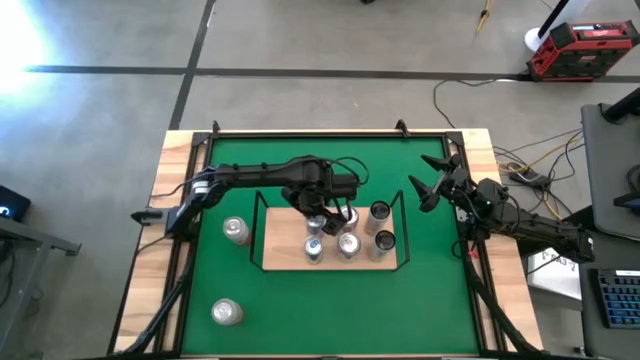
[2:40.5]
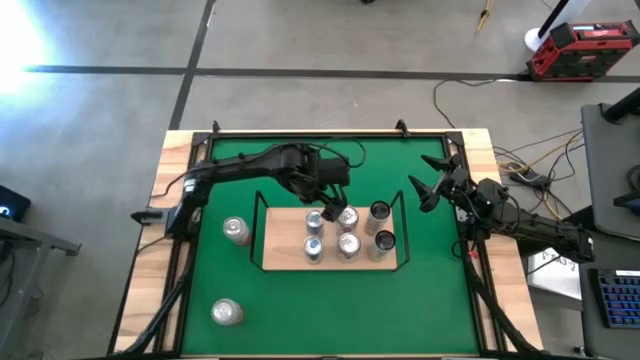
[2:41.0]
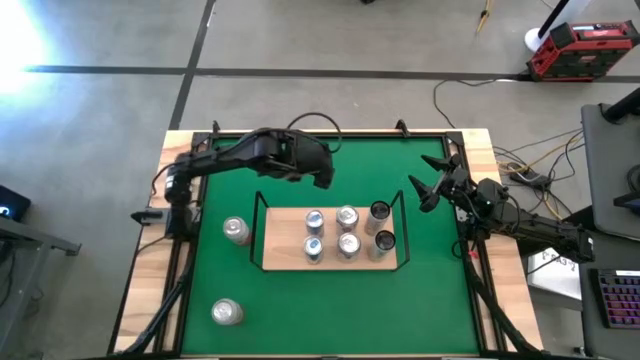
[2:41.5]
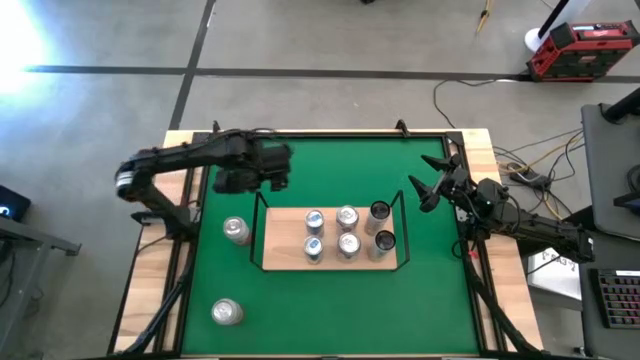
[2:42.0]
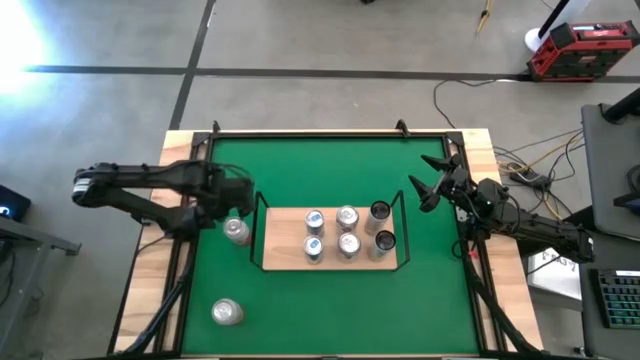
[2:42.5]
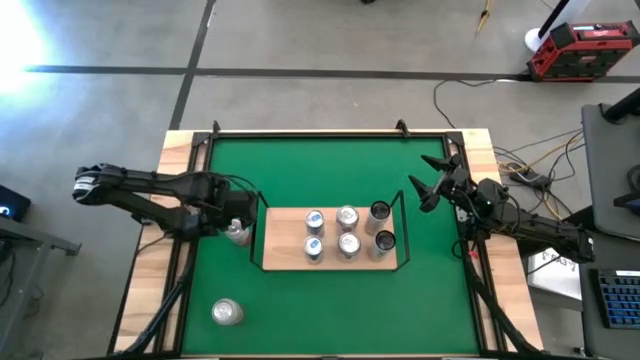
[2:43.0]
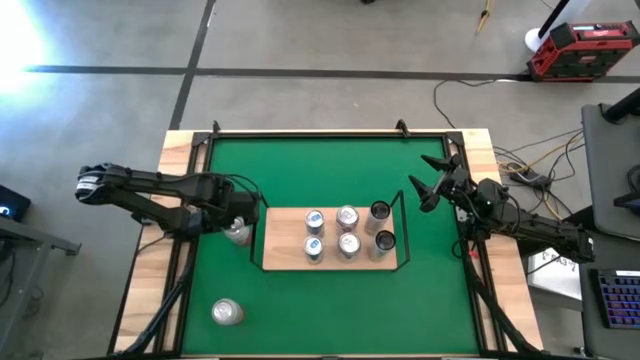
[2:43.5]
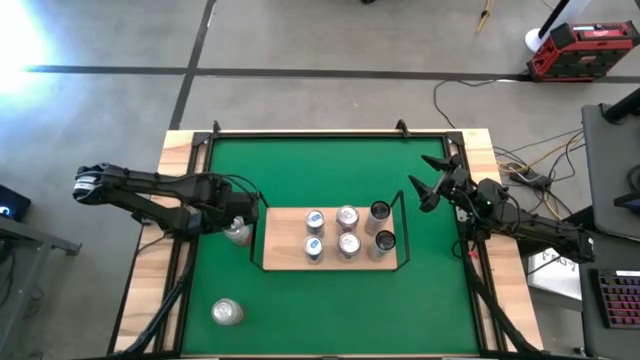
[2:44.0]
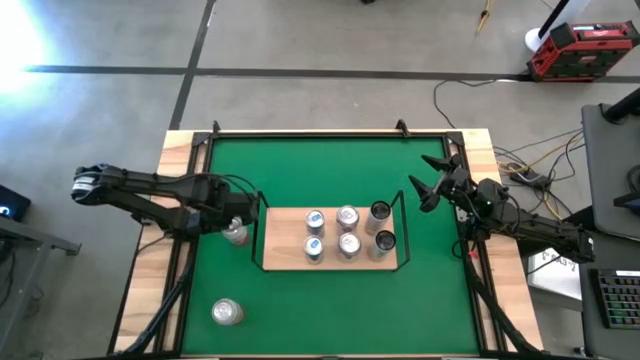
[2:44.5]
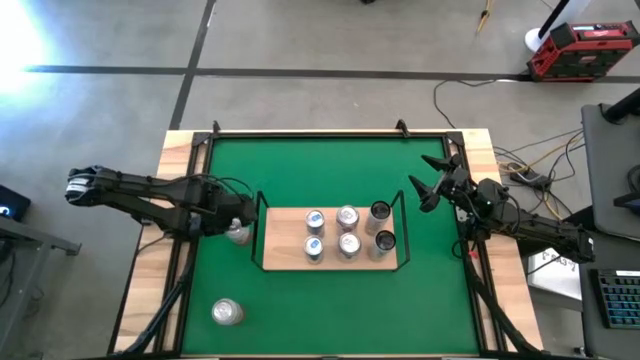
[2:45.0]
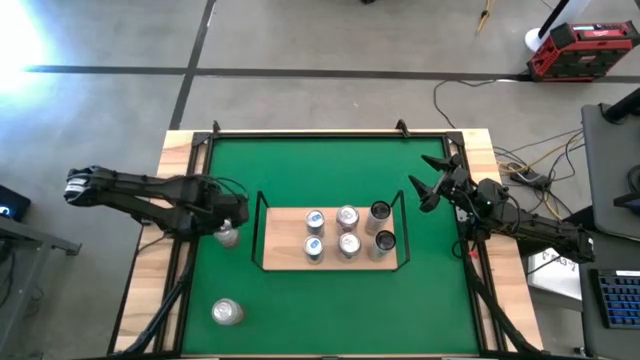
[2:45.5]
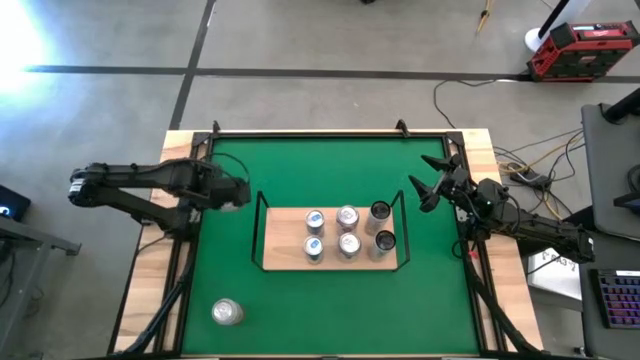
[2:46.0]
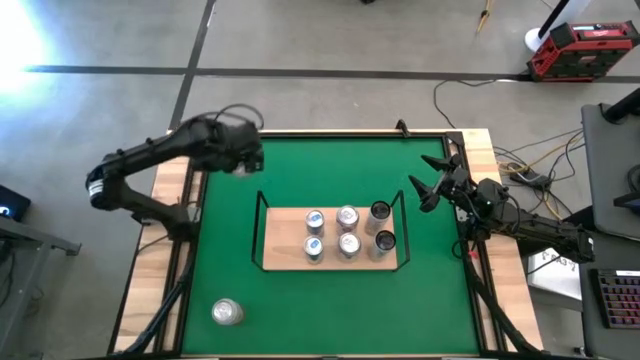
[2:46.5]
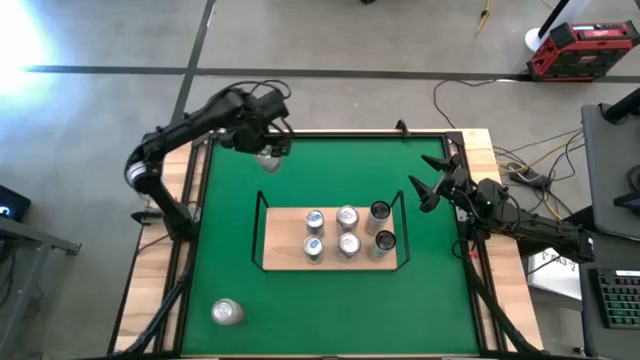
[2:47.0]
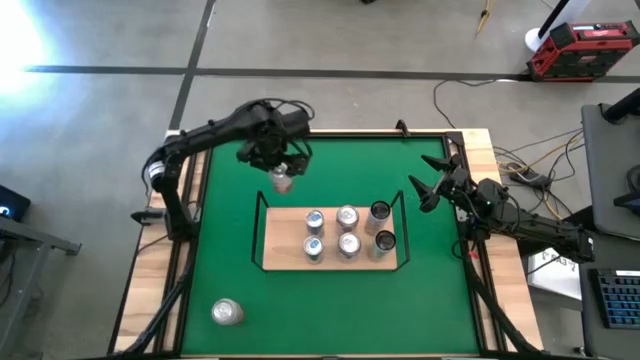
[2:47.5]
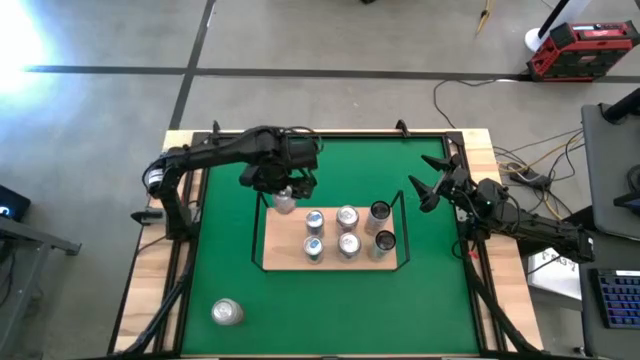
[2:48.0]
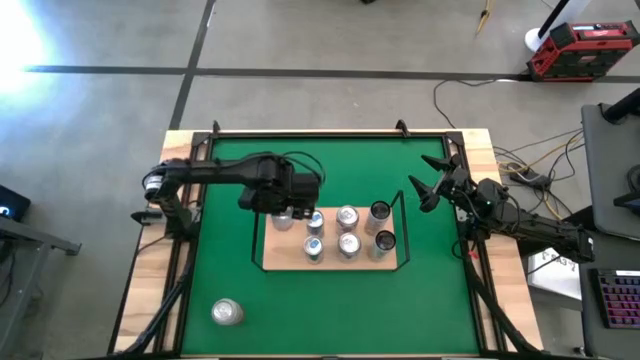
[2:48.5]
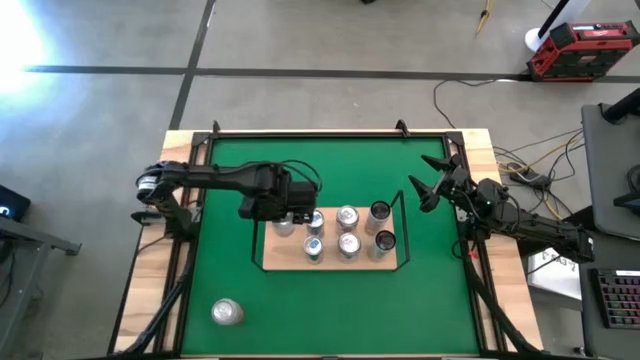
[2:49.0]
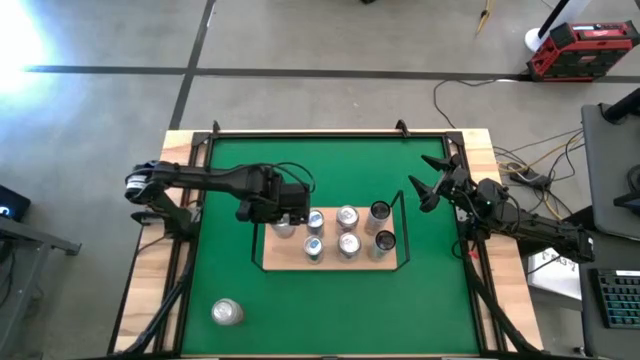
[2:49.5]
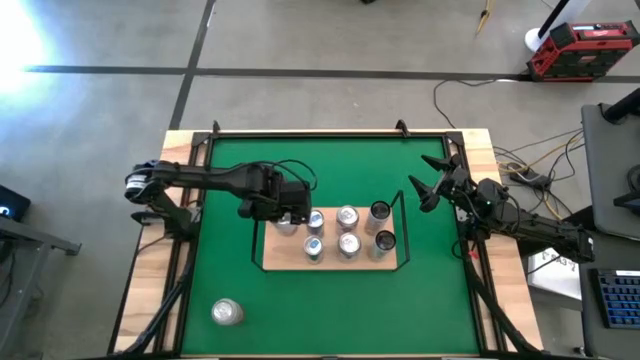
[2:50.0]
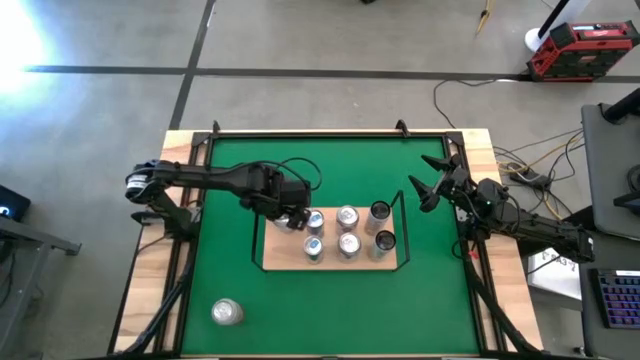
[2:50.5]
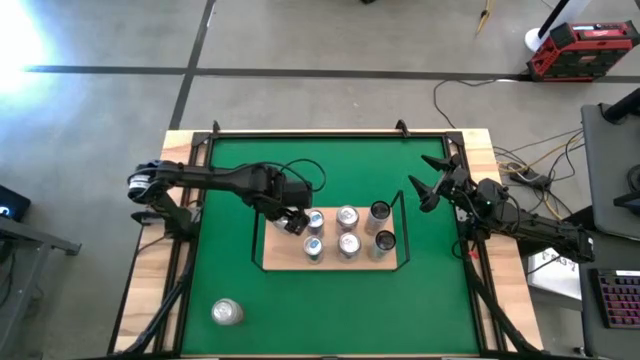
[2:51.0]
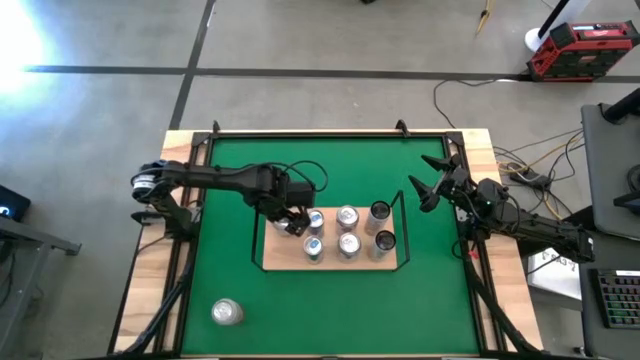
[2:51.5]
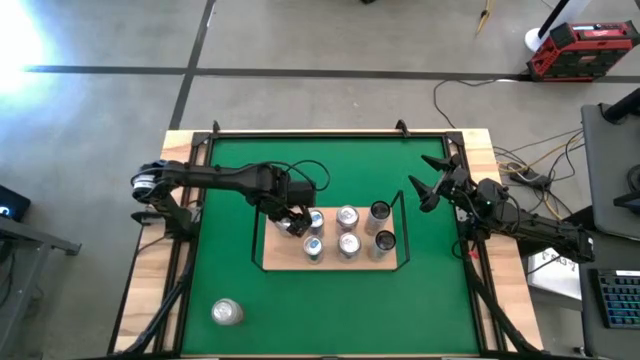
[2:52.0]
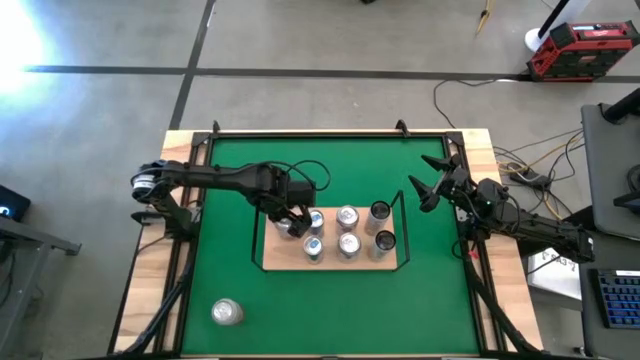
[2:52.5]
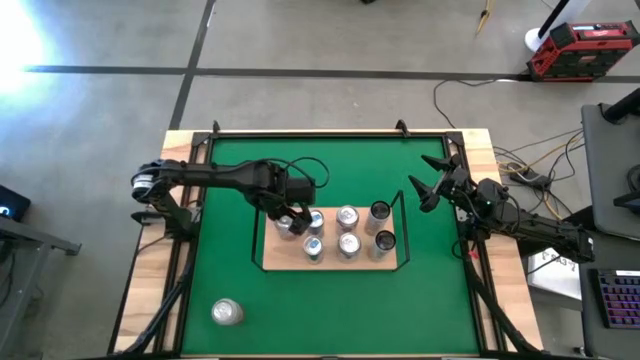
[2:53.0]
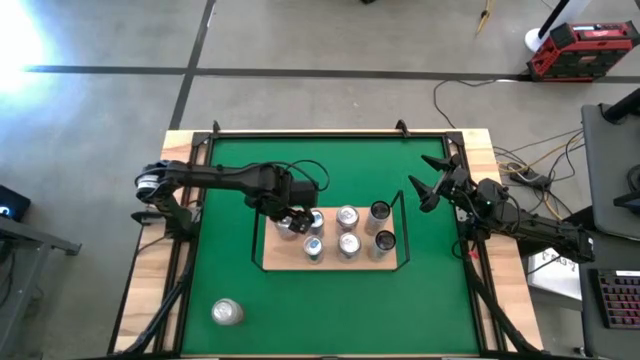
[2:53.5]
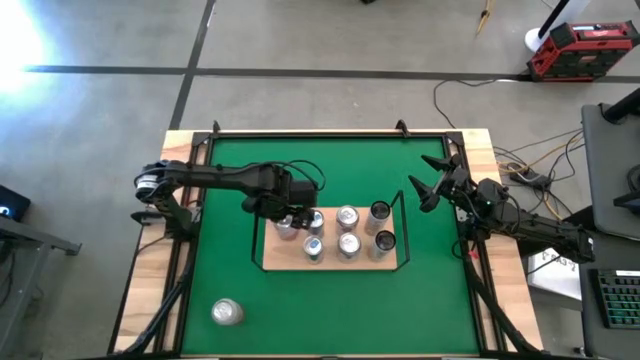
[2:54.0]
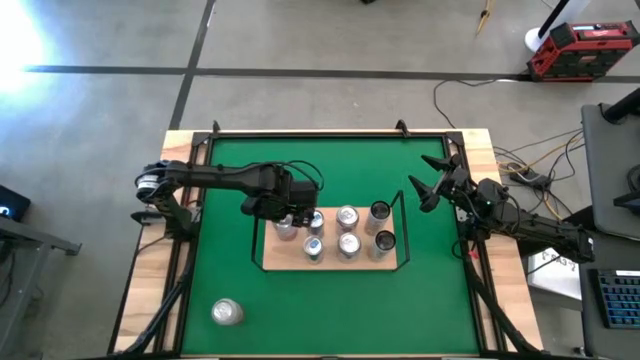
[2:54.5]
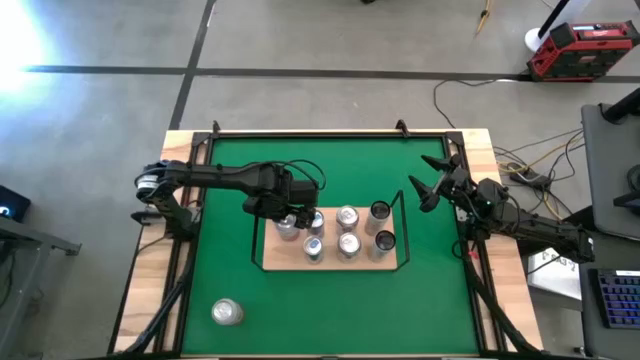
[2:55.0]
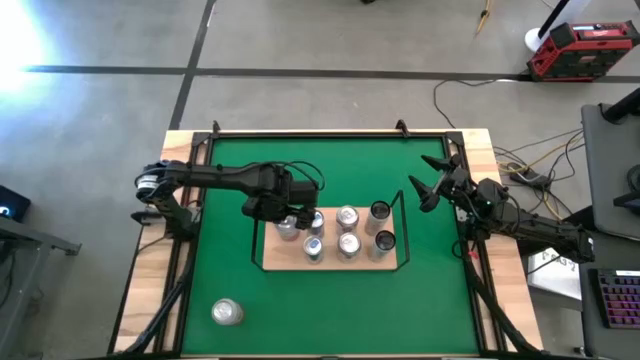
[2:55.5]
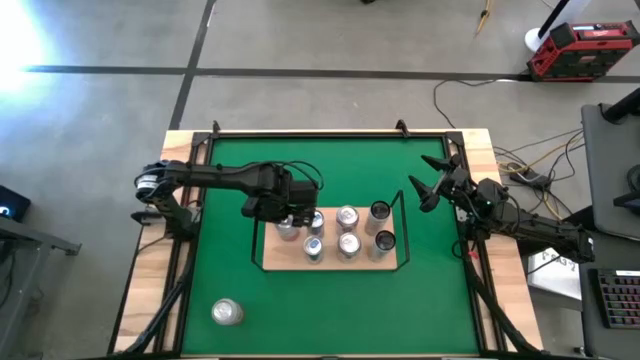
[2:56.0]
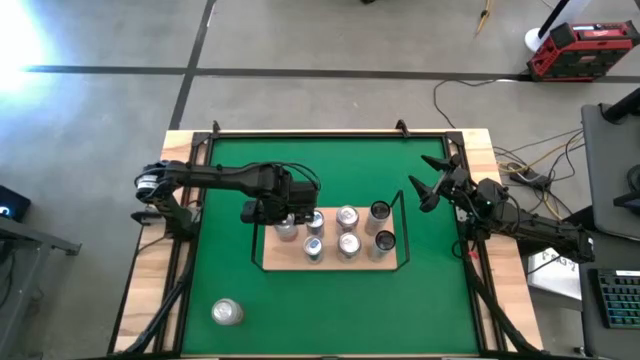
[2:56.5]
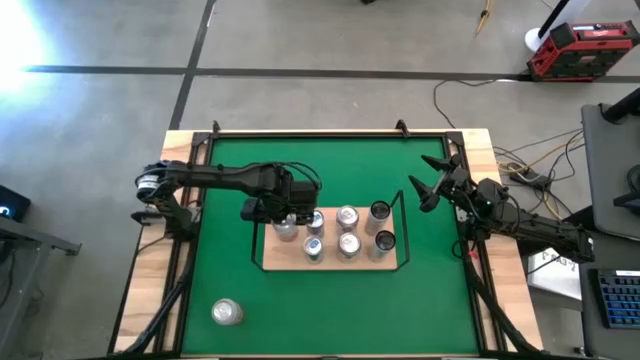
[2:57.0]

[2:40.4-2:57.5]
Task: Place canned beverage on shelf
Put the top white-pink soda can on the shelf

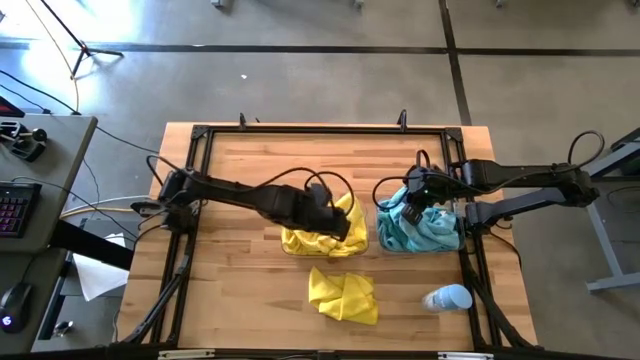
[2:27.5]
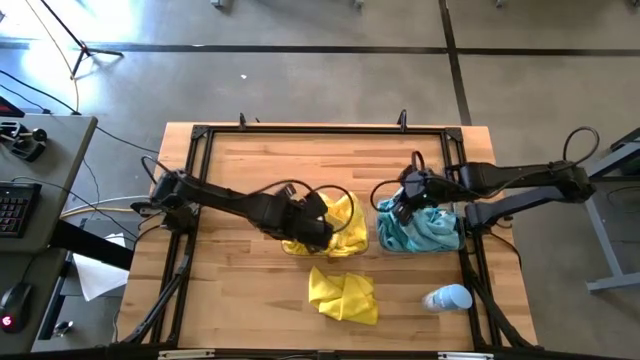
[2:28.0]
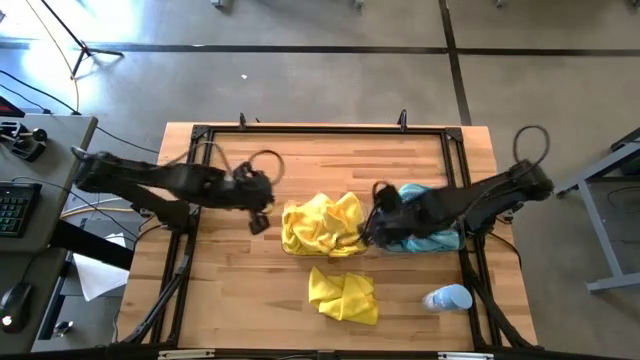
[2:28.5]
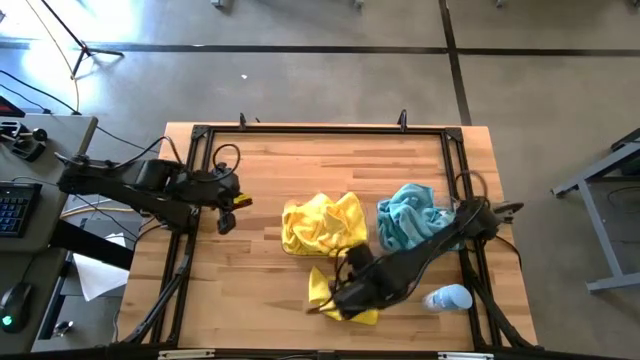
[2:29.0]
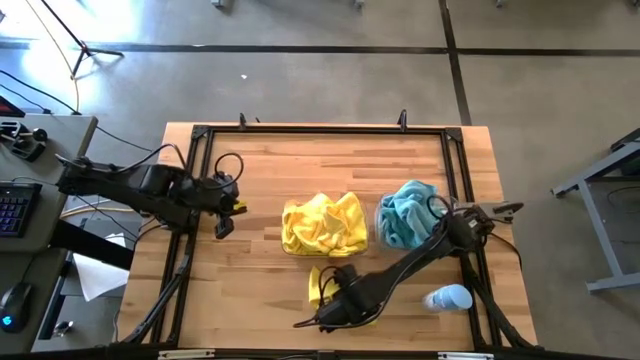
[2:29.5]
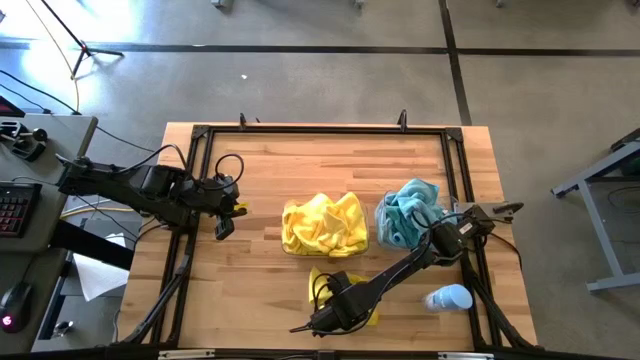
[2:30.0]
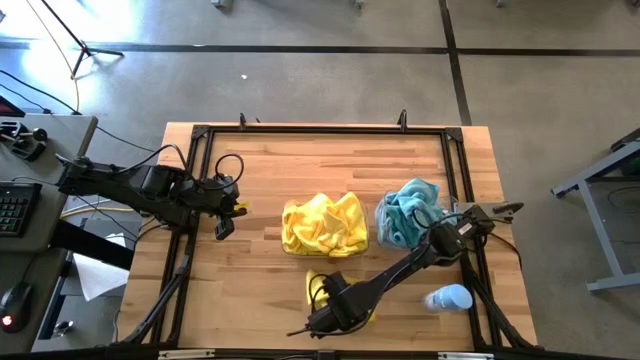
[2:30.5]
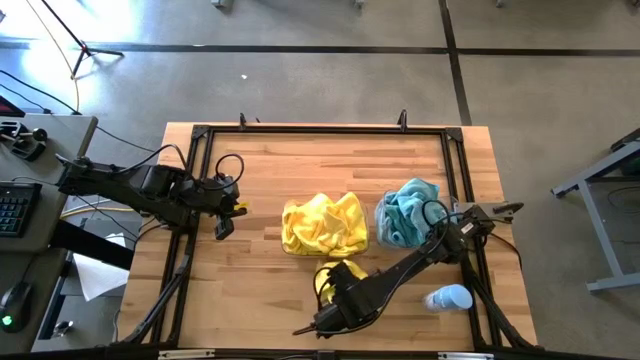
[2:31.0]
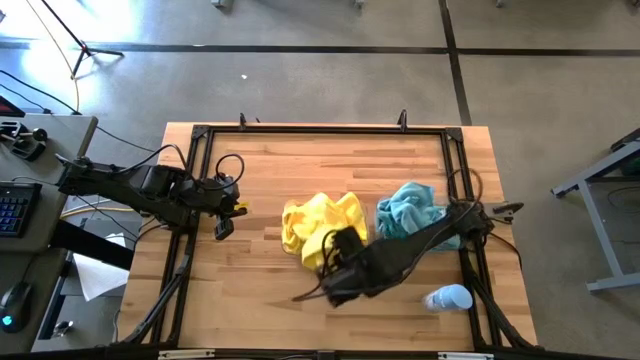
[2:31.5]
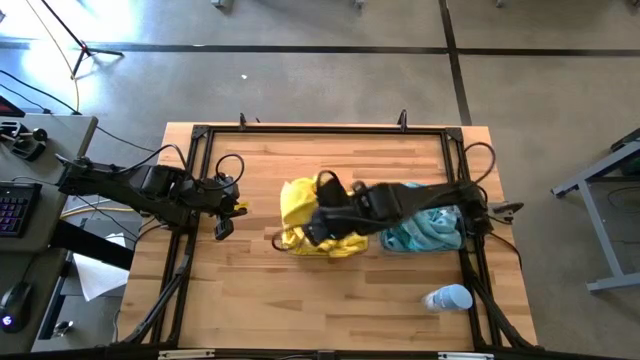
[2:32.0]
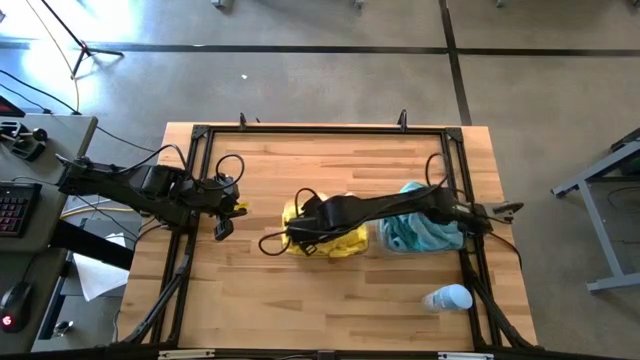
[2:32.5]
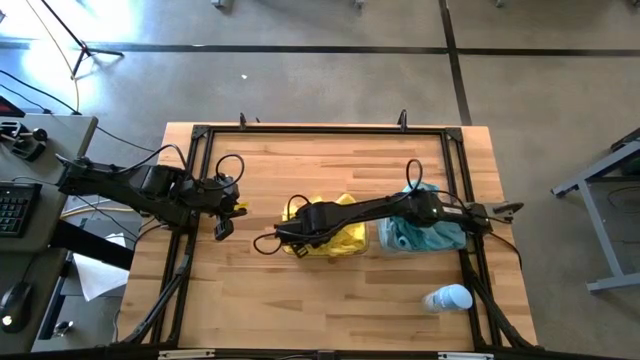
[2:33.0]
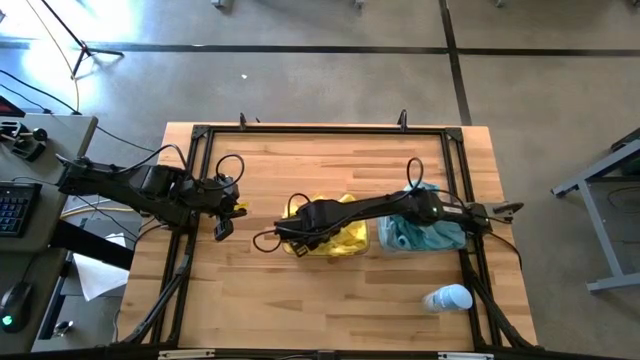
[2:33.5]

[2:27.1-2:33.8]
Task: Sort microfiber towel by color & place in baskets
Put the yellow microfiber cloth into the left transparent bin
